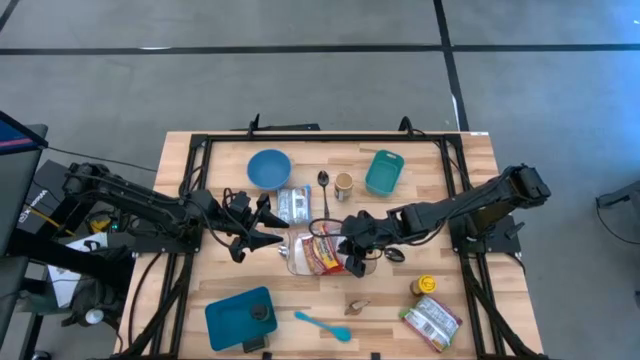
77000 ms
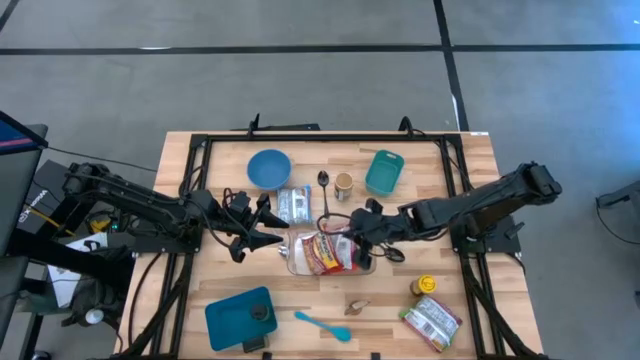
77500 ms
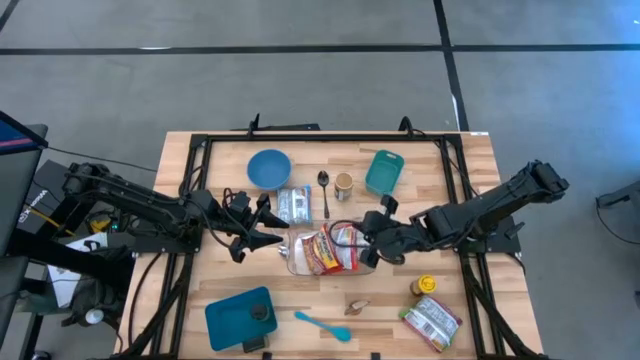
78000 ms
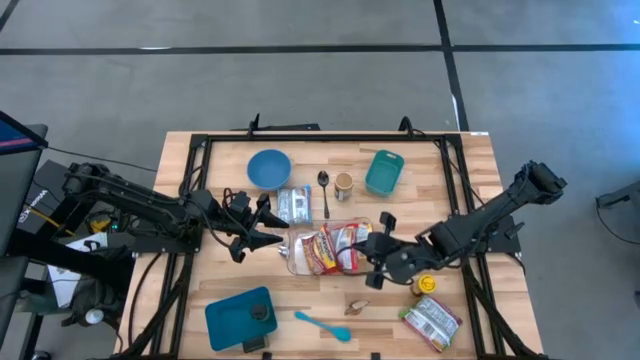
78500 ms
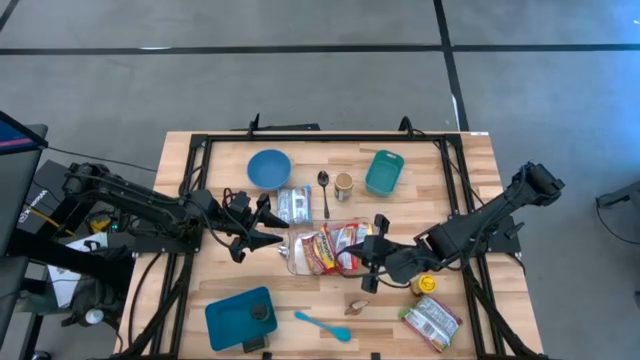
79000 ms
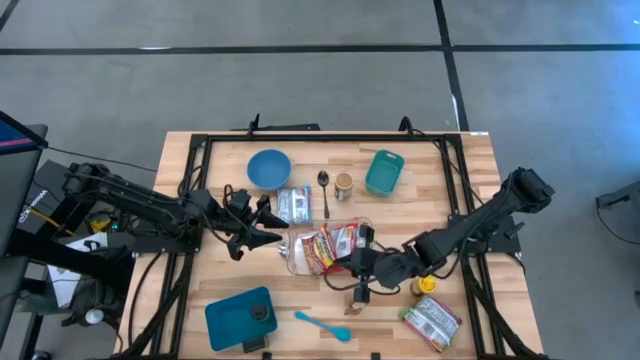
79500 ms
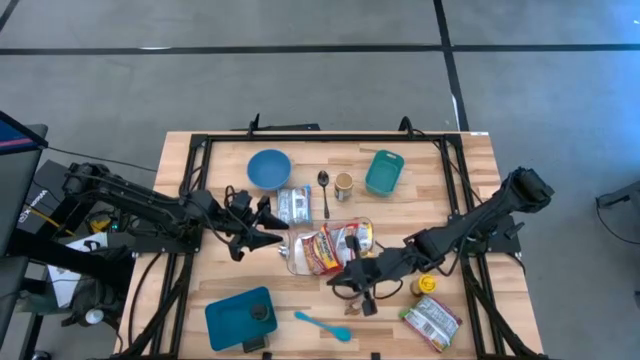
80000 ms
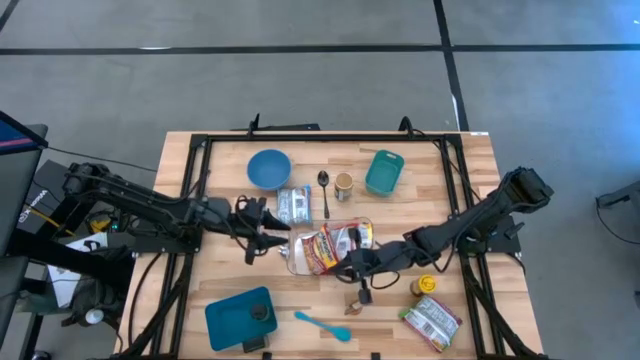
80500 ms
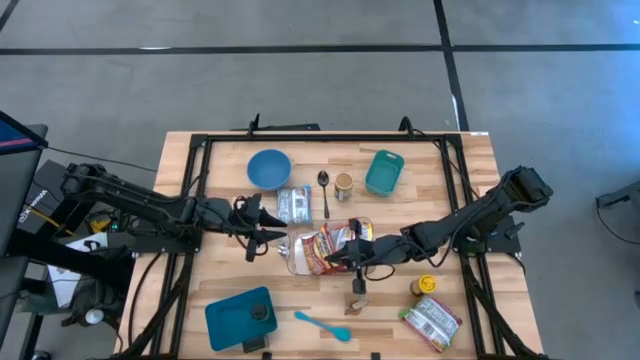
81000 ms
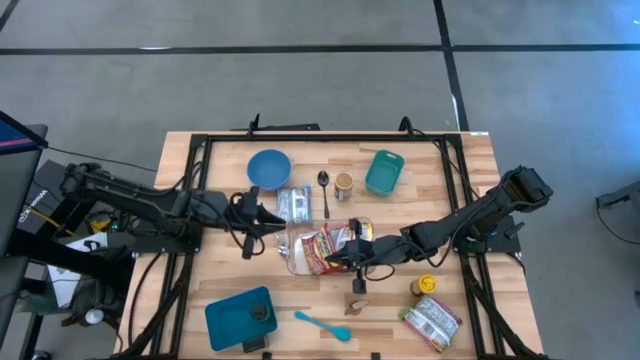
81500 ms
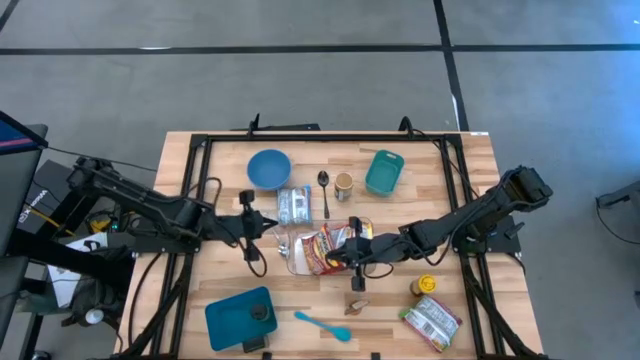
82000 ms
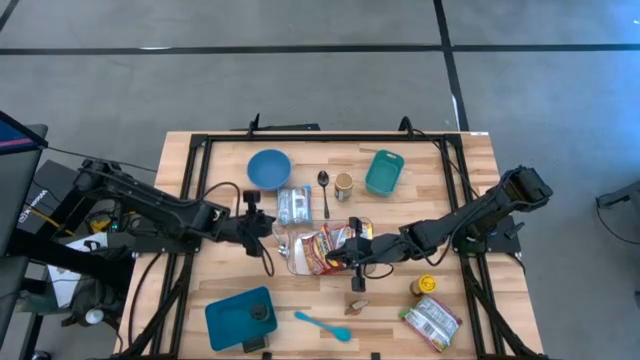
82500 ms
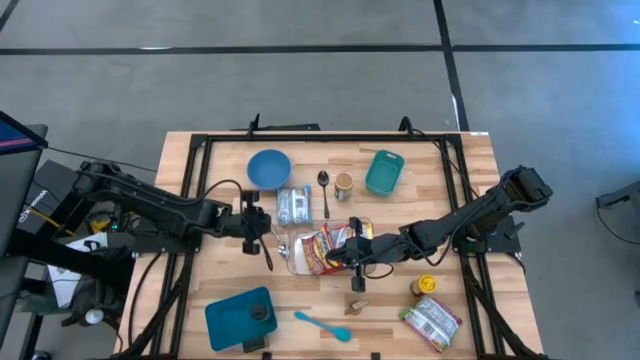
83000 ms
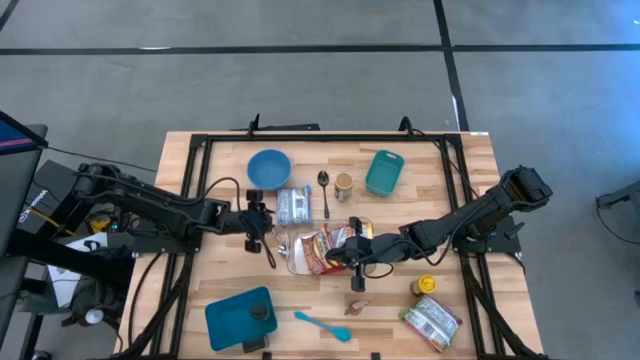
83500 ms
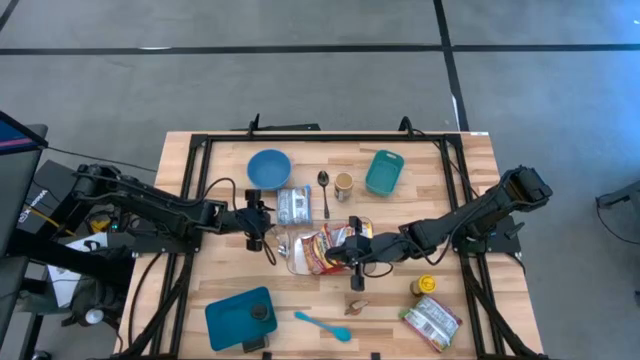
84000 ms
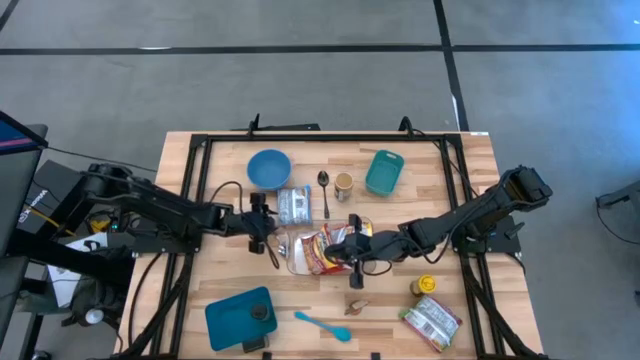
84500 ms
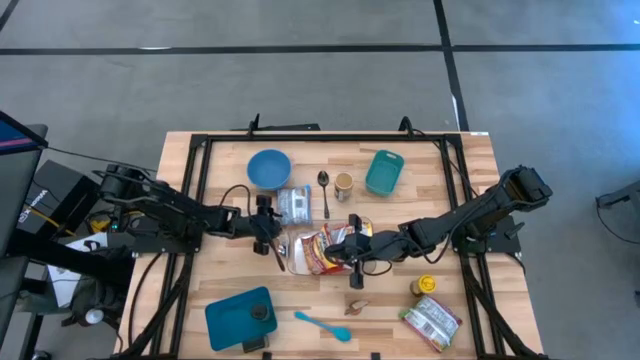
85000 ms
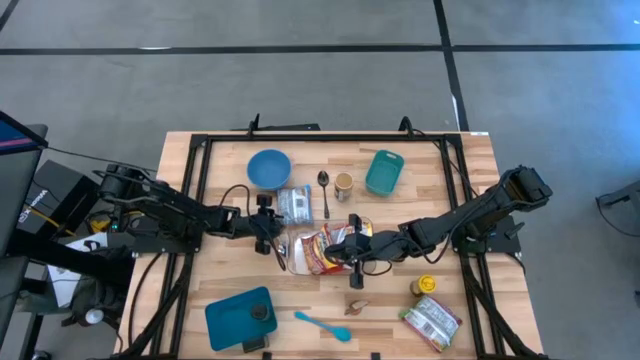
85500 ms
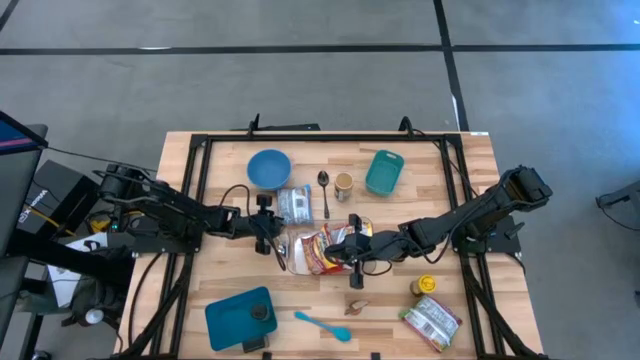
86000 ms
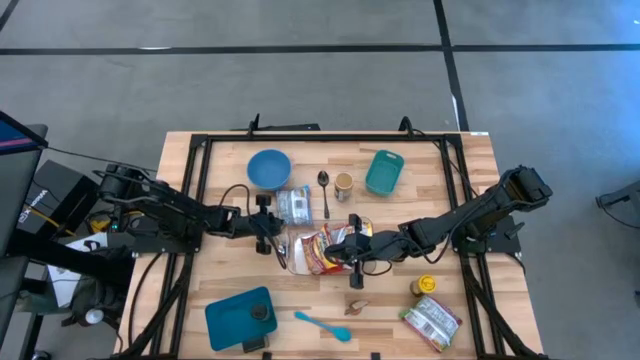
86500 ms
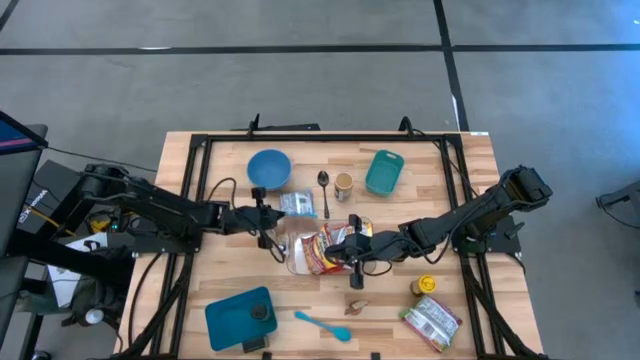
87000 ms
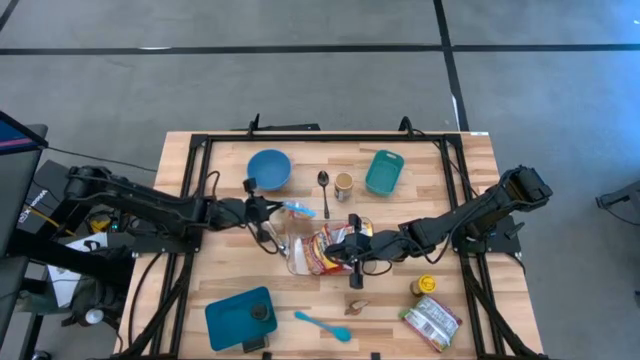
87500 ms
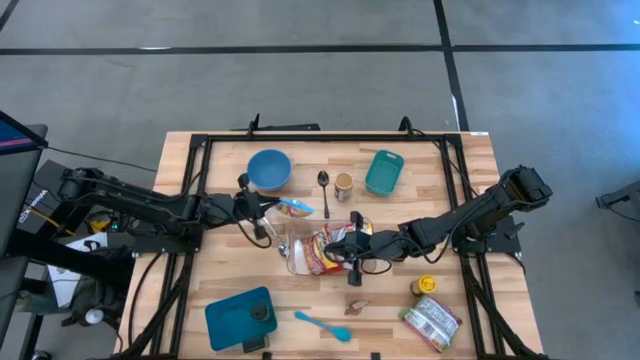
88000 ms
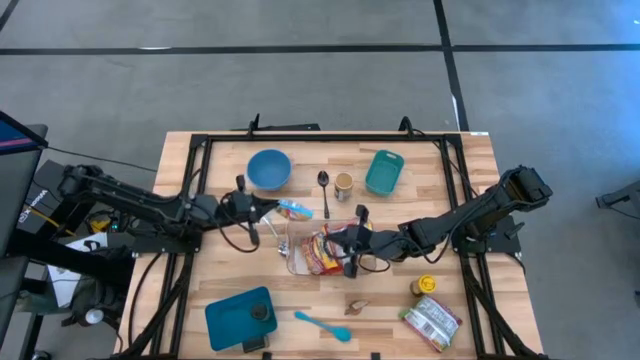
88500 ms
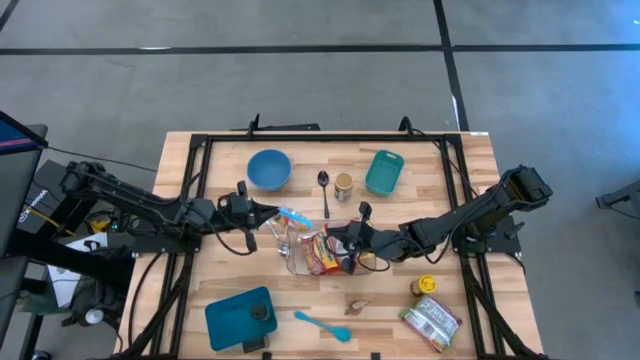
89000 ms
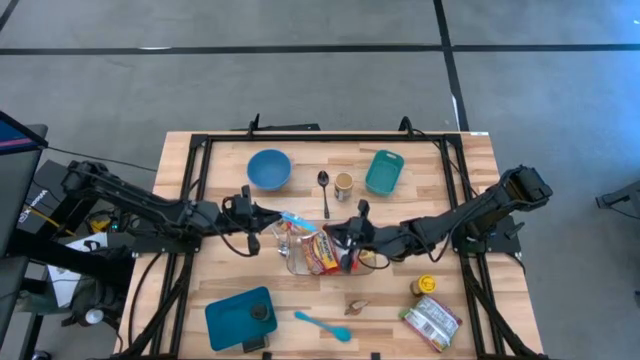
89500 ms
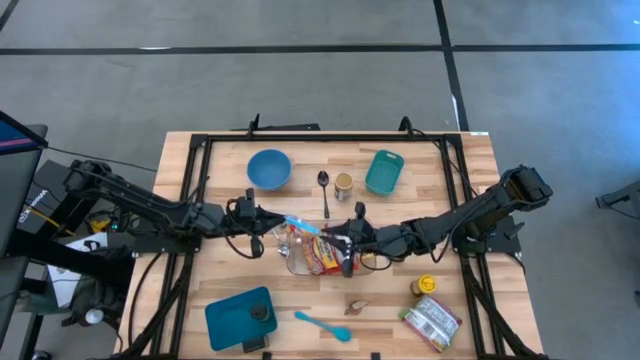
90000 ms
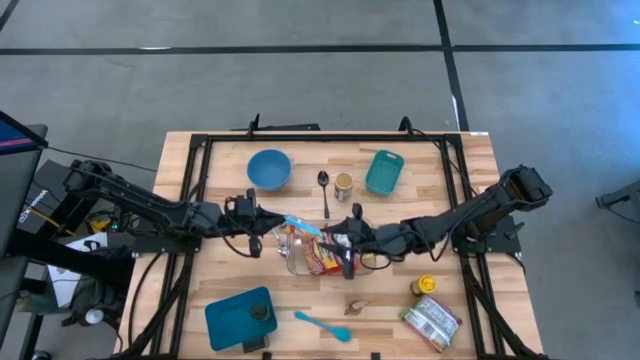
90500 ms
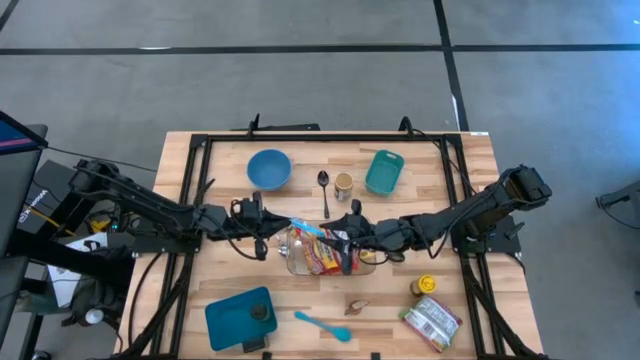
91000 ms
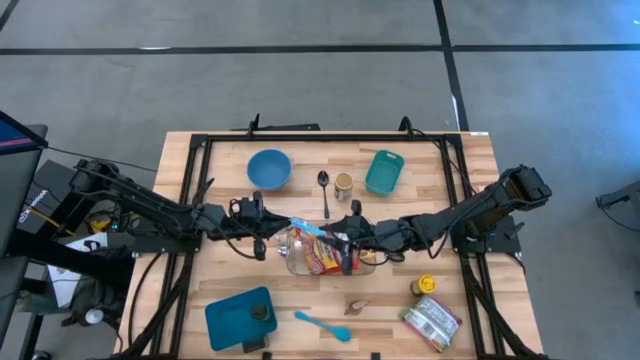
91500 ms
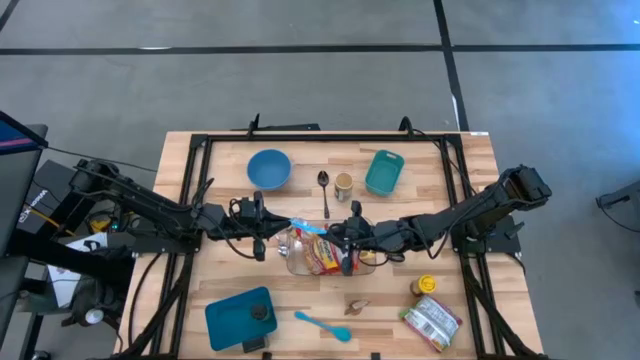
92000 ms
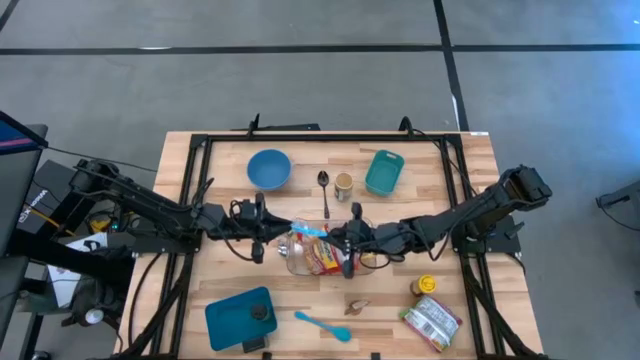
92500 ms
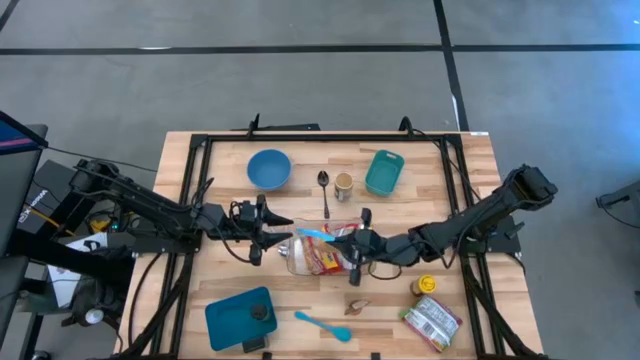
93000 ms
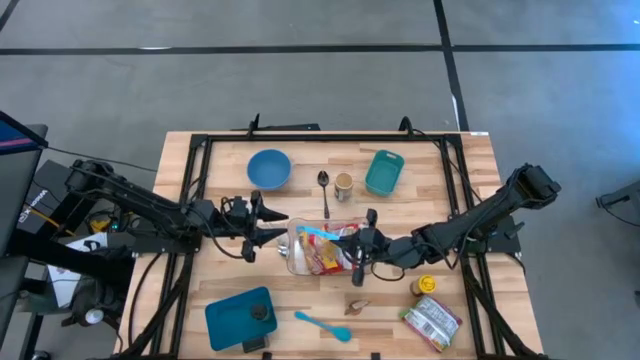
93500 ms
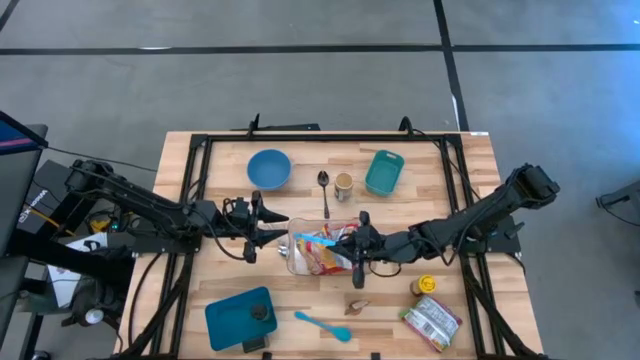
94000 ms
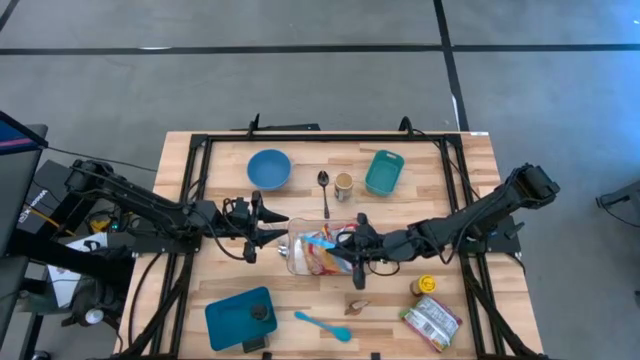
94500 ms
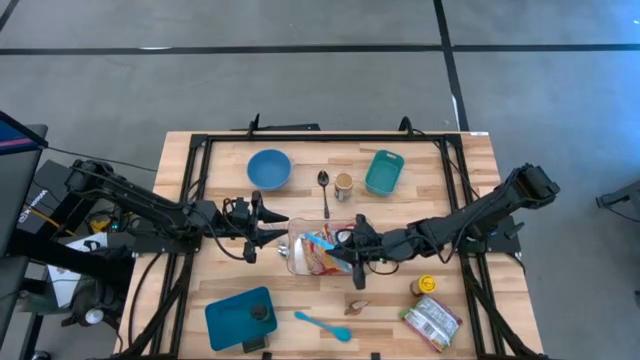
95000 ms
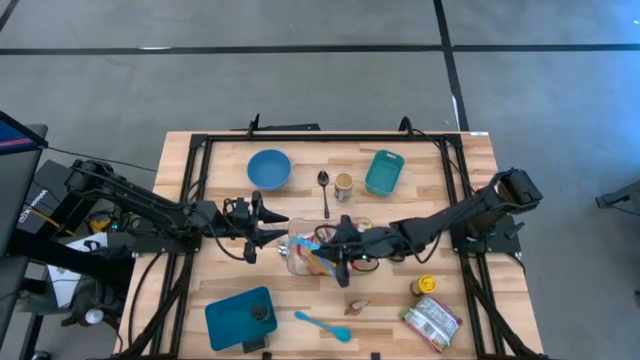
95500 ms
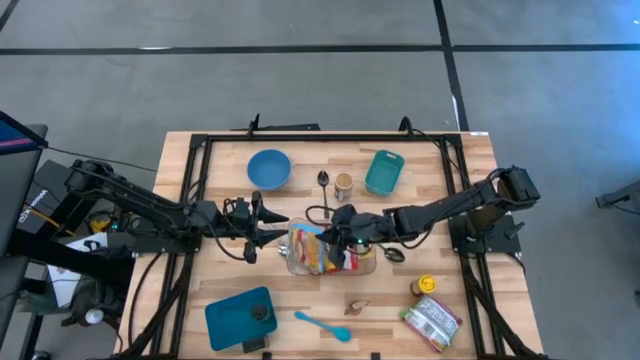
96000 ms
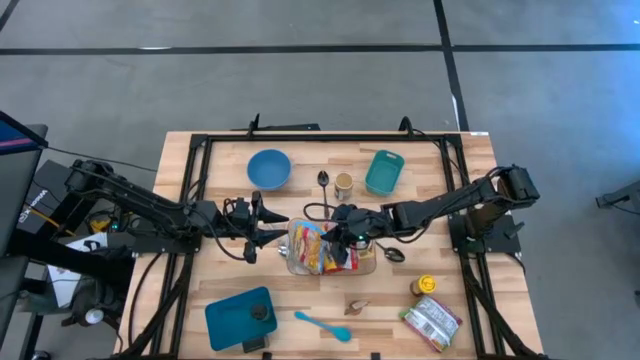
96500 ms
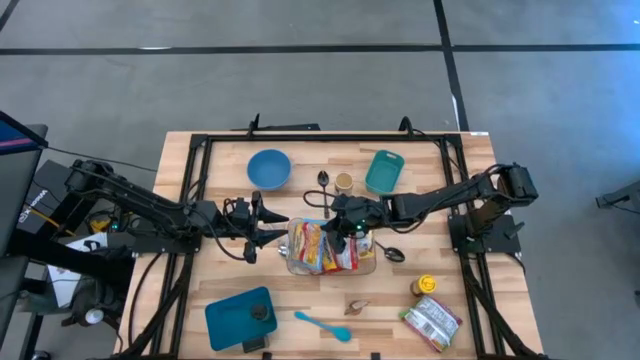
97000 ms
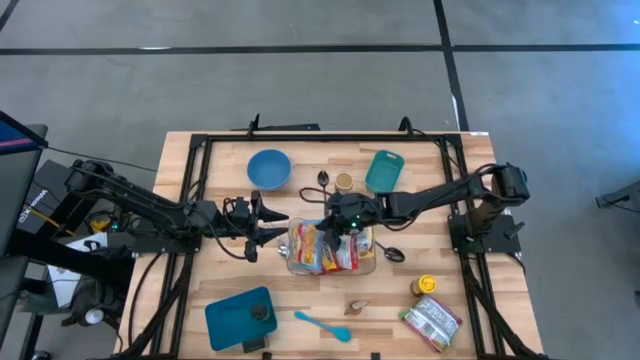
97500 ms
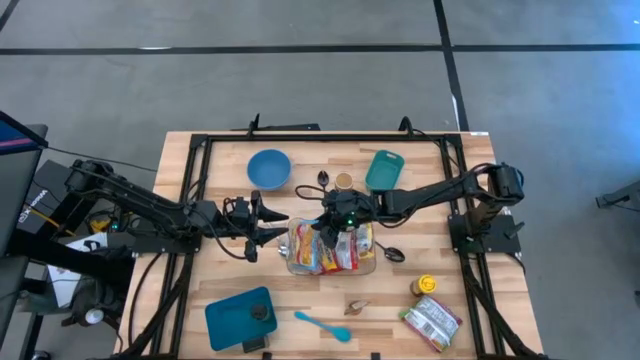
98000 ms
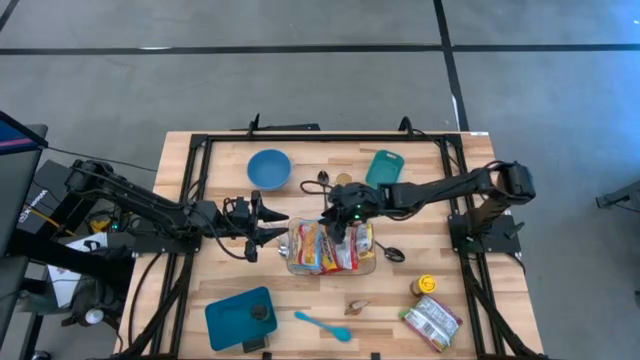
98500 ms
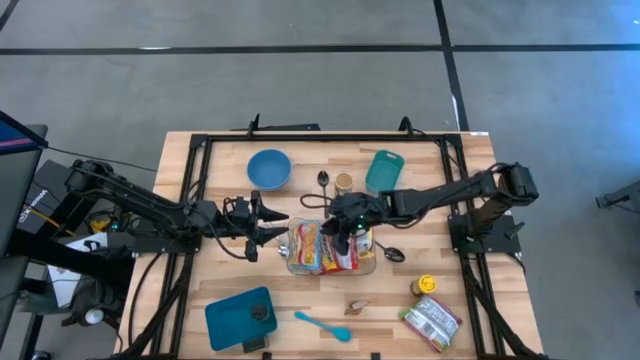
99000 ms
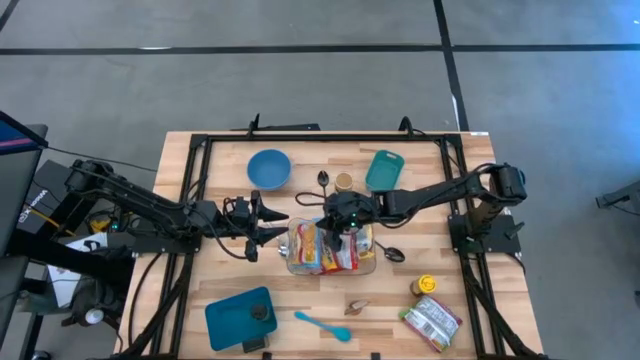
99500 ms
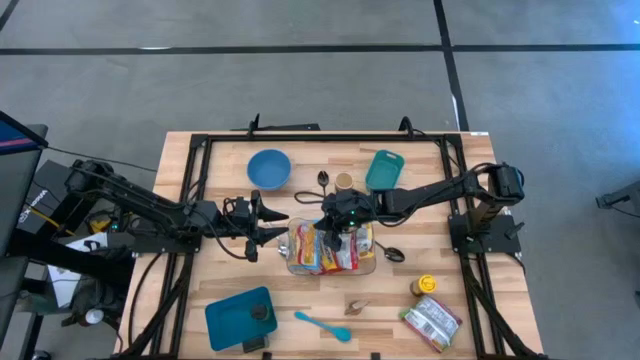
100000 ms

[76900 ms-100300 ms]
Task: Pick & Place Food Item
Put the light blue noodle pack into the transparent bin
